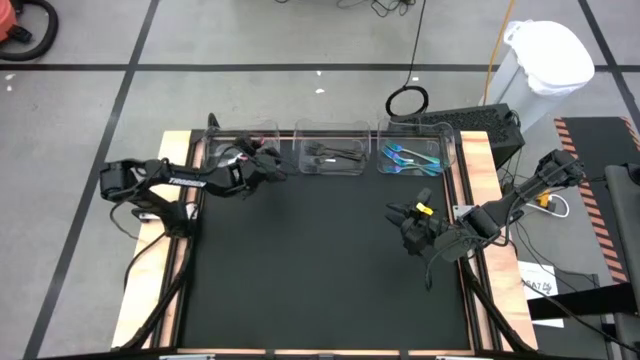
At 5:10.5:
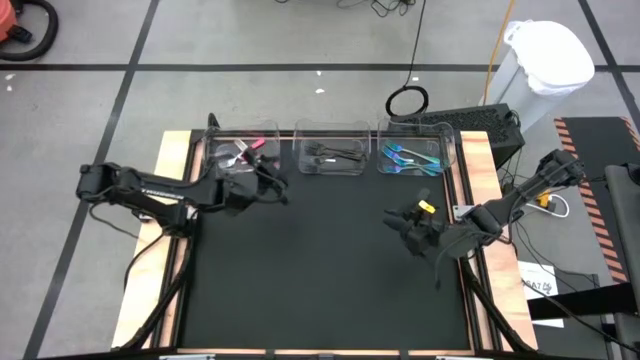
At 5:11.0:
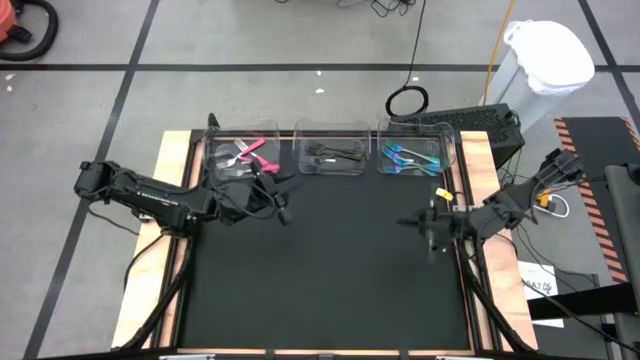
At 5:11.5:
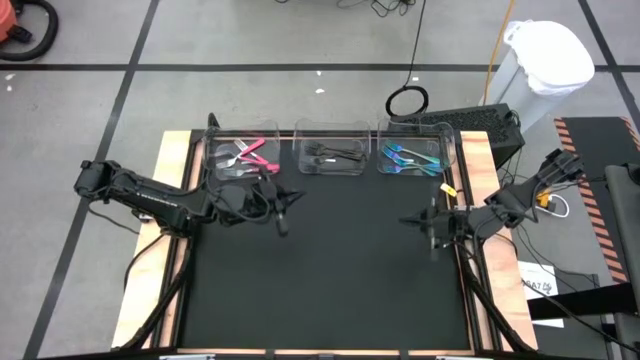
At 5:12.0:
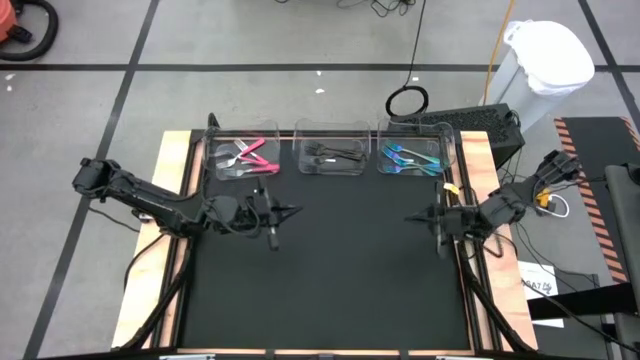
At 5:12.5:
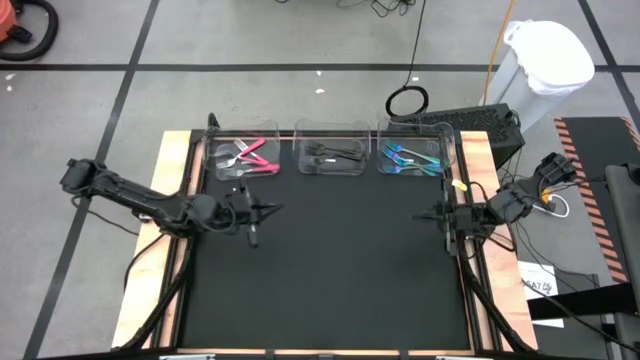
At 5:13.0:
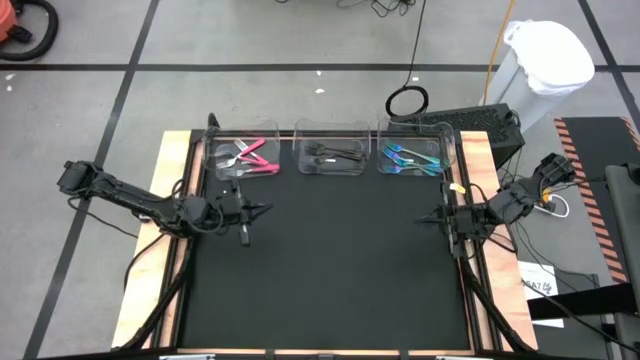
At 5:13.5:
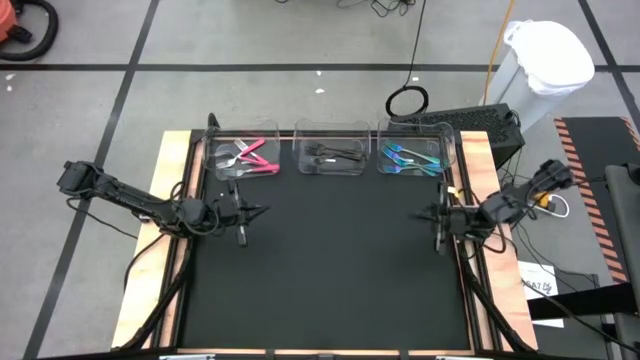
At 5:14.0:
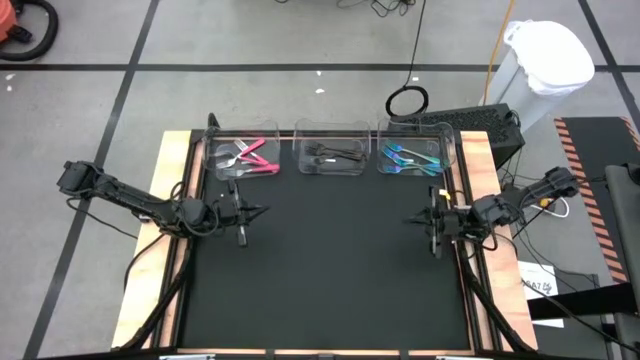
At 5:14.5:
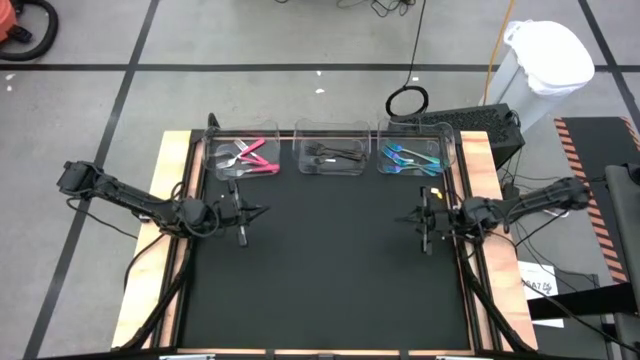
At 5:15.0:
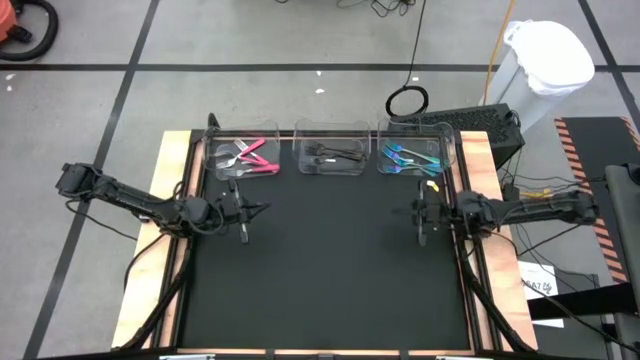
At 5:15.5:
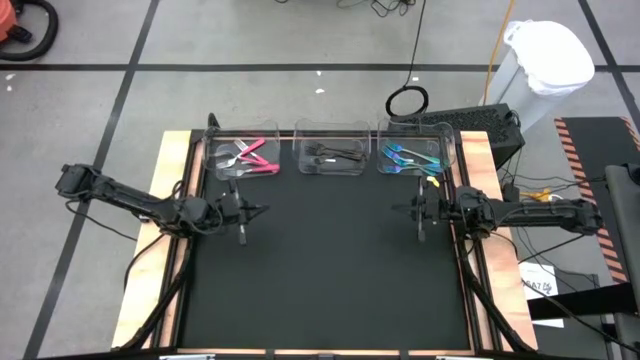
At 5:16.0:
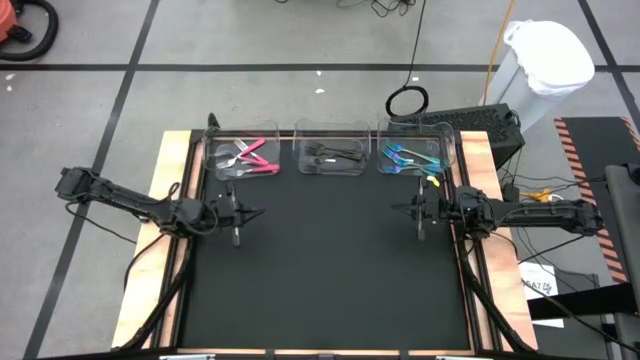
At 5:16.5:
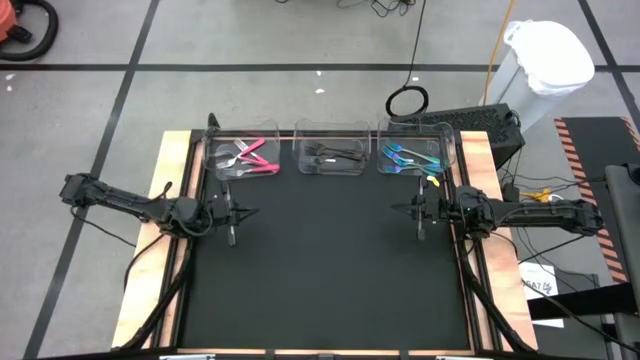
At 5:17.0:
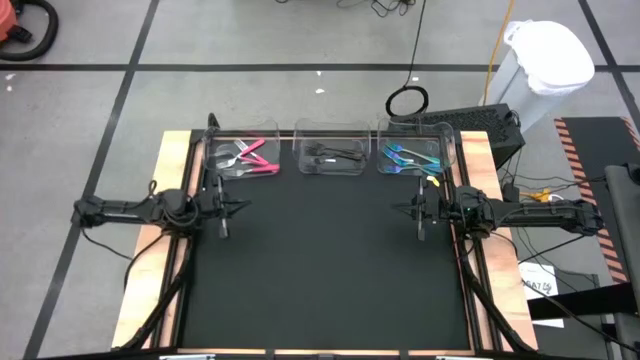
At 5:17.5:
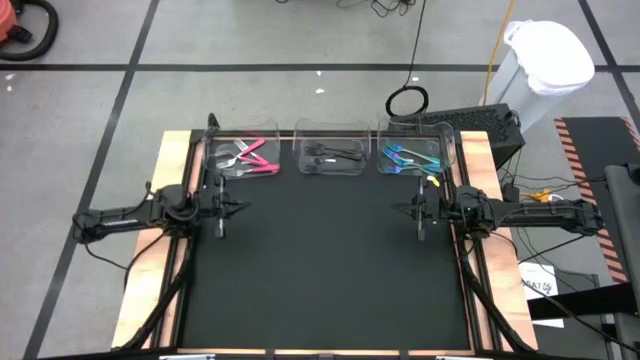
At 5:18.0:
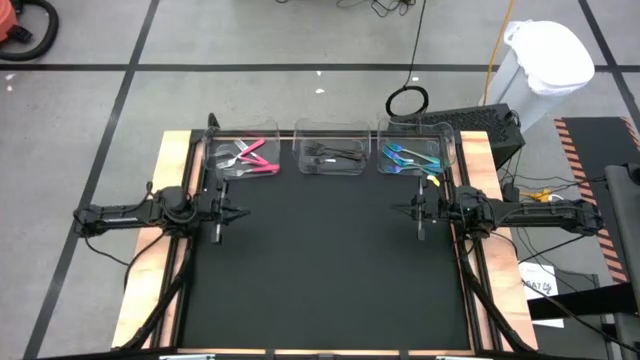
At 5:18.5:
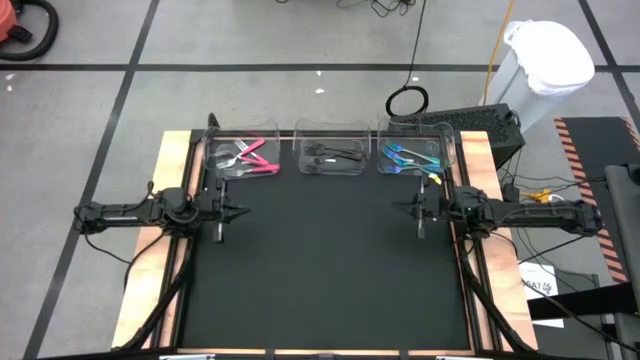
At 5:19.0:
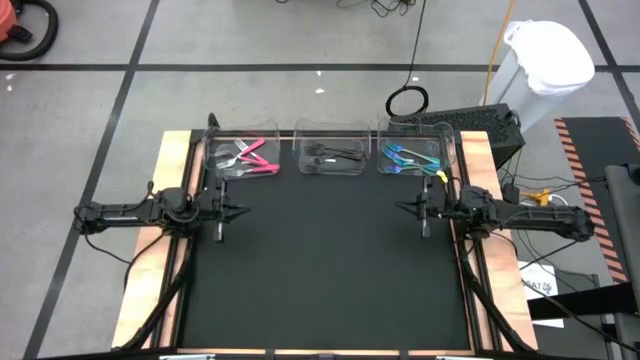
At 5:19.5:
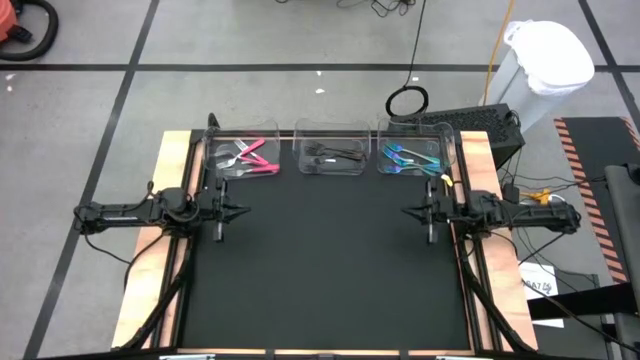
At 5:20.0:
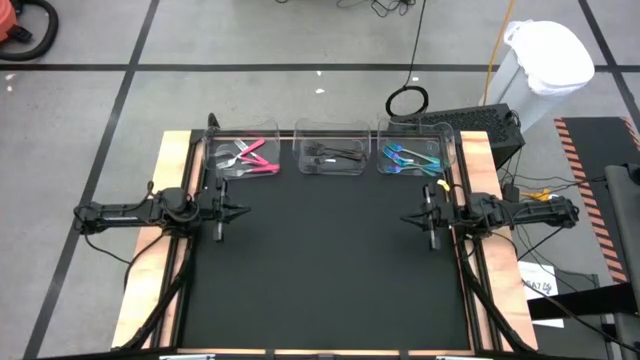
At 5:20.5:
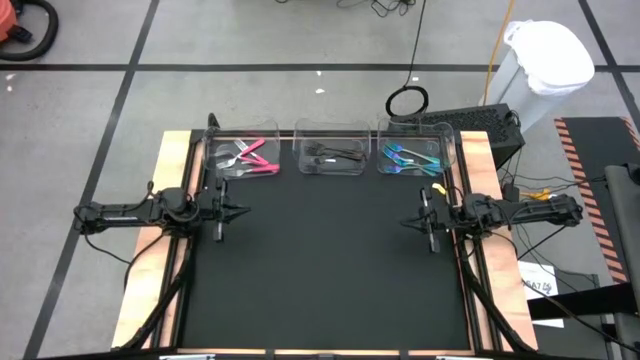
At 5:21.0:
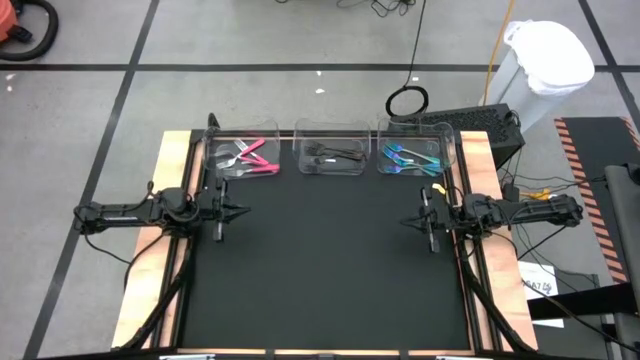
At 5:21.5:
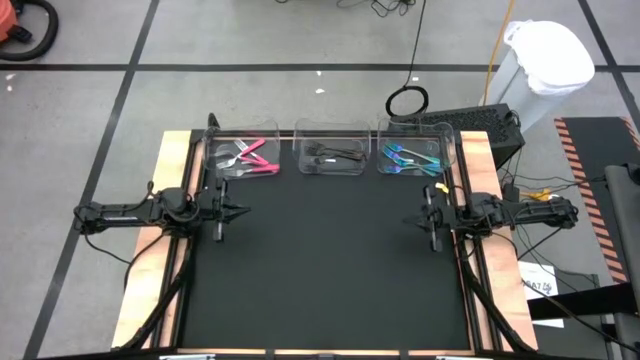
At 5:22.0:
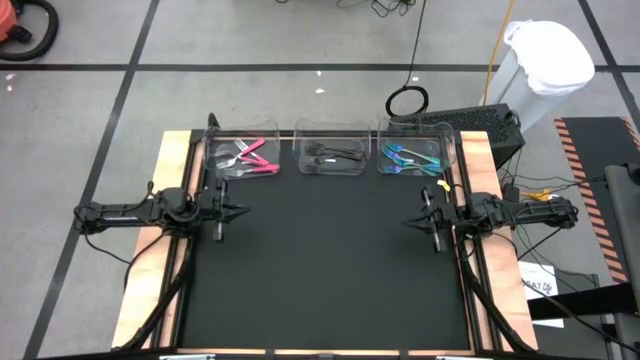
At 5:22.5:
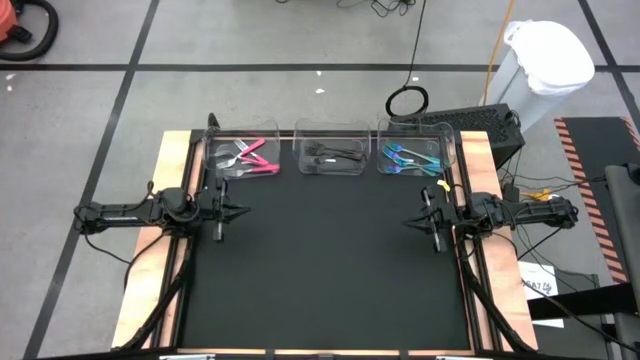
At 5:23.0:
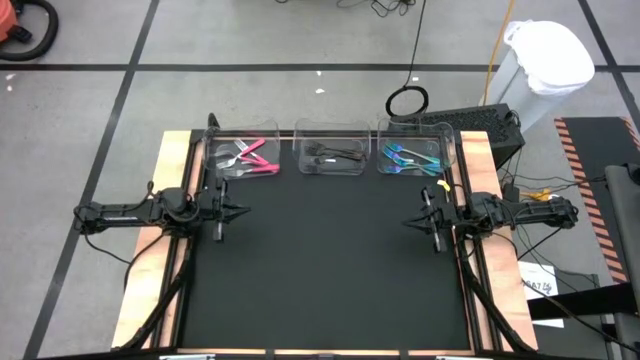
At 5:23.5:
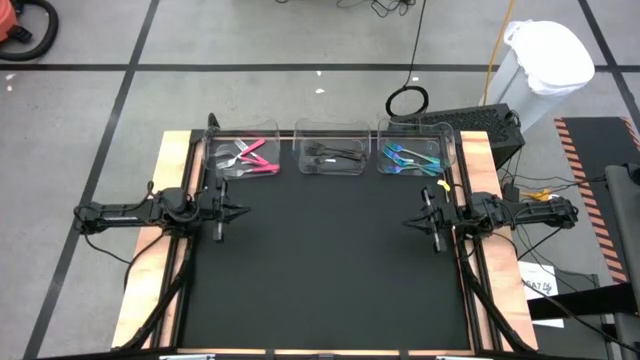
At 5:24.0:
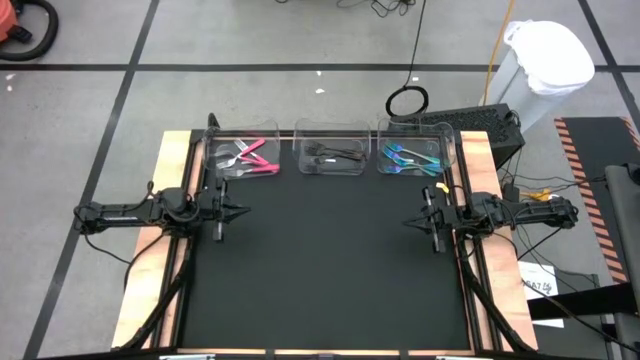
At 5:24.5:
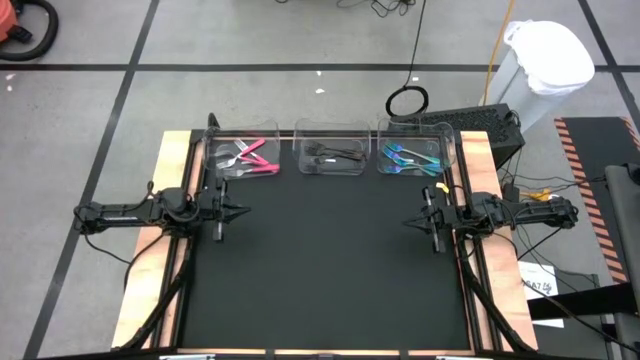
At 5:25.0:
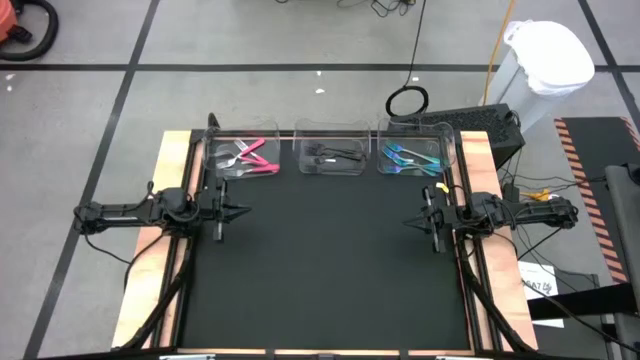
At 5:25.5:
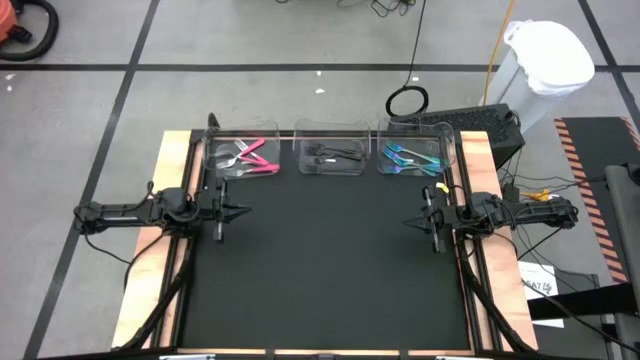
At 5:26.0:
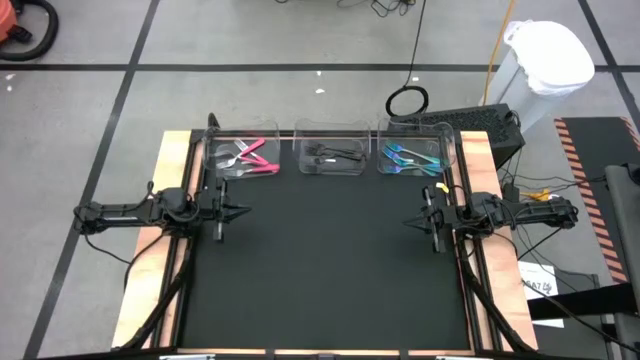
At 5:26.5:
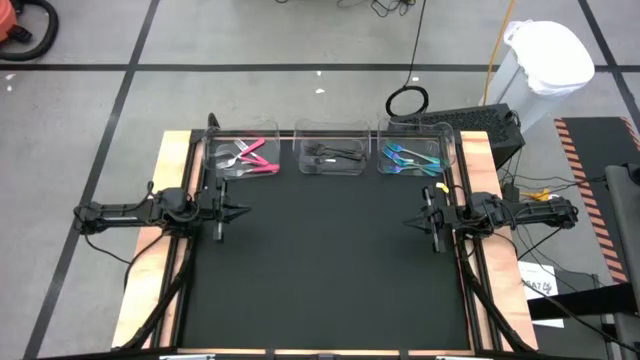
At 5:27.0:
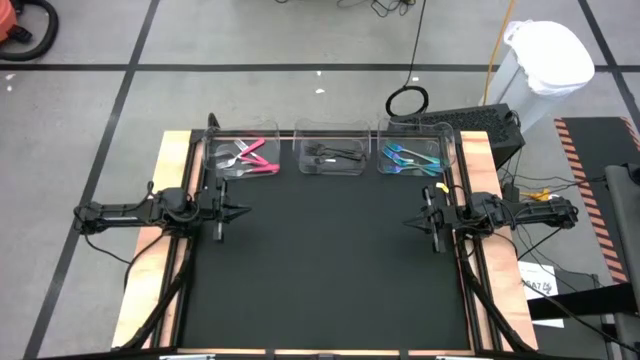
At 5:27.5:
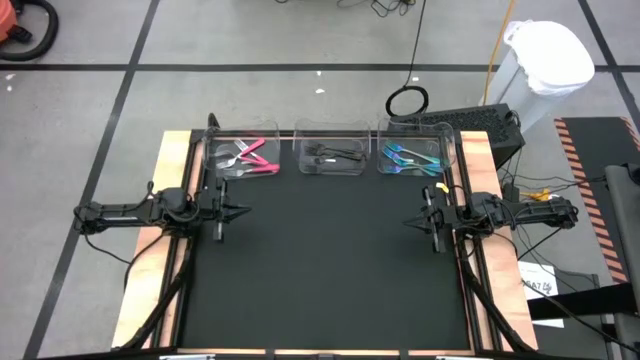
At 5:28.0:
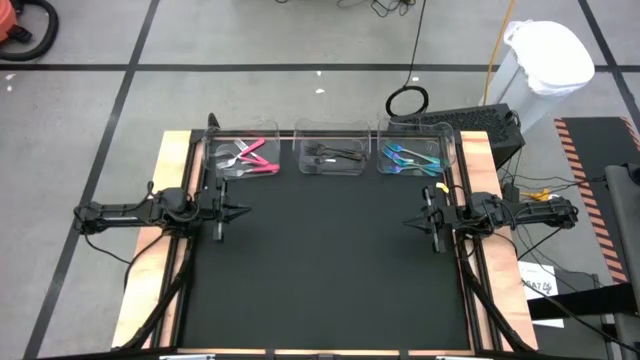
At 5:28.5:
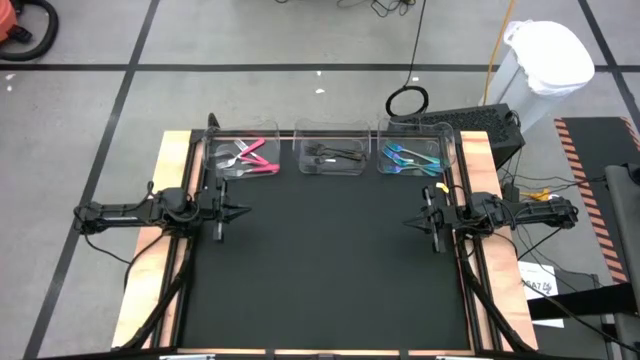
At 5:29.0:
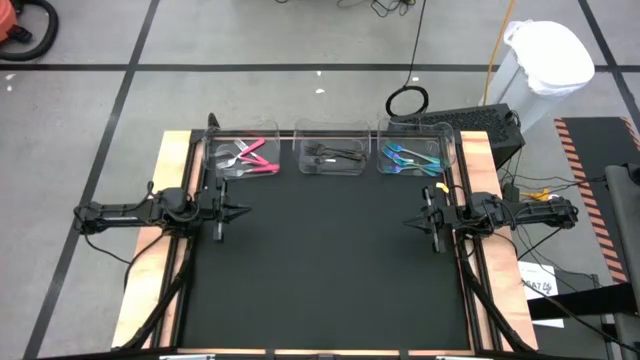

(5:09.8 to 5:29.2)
Task: Sort silverware by color (type)
Return to Home Position

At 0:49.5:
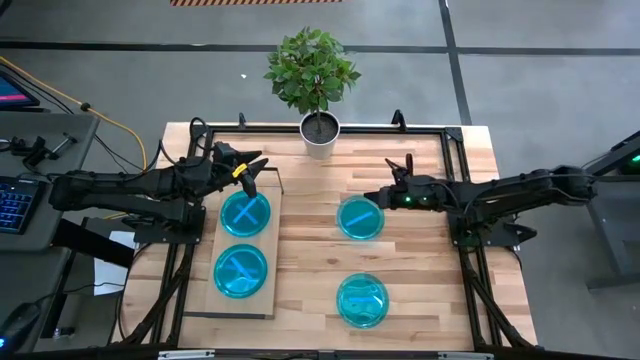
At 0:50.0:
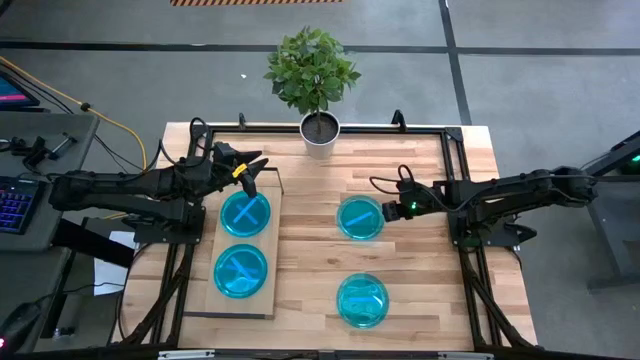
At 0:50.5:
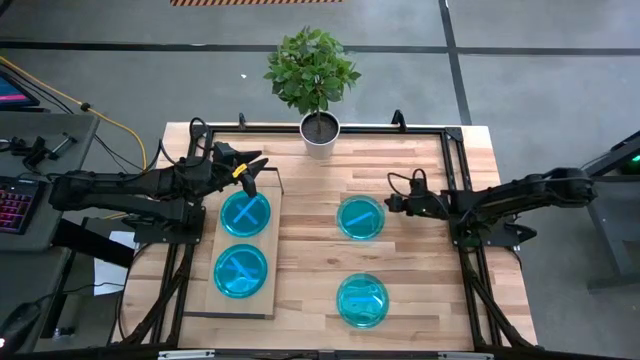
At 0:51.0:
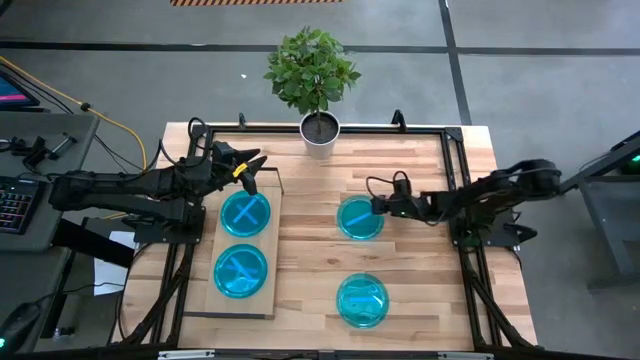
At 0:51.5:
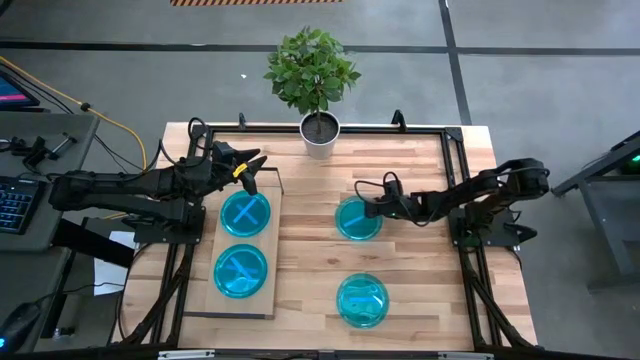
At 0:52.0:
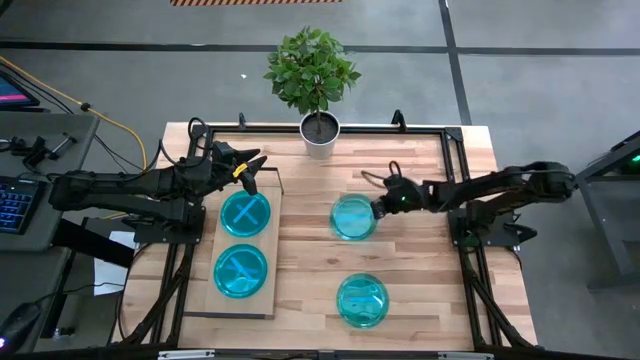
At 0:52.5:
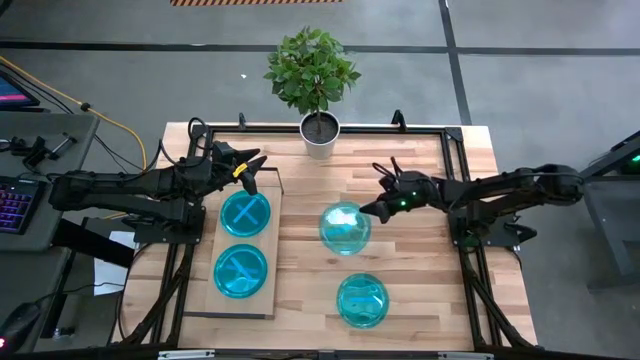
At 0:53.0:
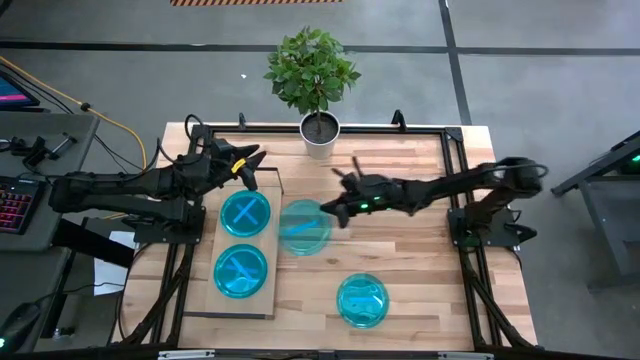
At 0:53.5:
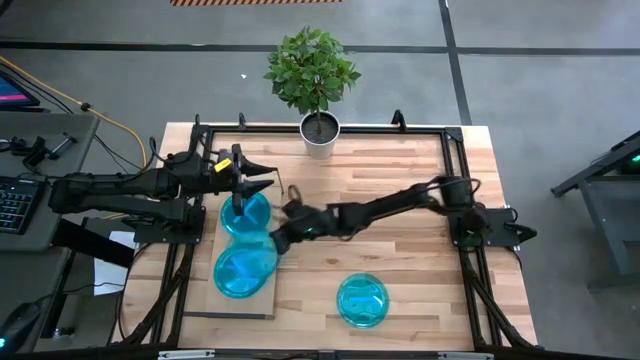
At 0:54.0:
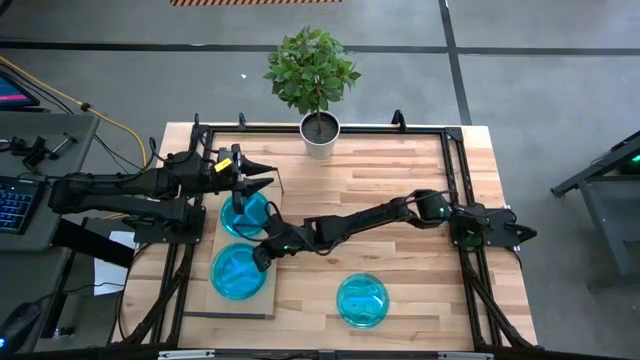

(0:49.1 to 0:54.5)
Task: Place and stack plates onto a shelf
Stack the top blue plate on the bottom blue plate on the shelf
